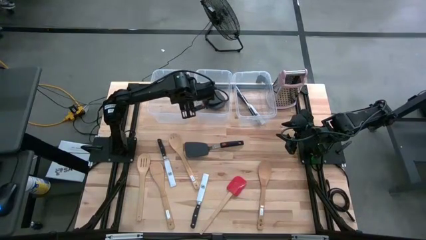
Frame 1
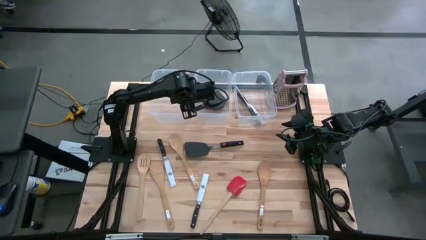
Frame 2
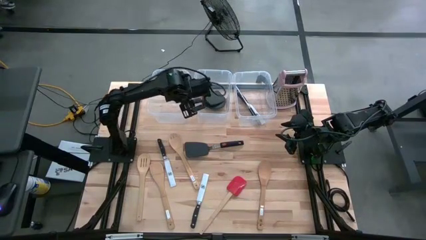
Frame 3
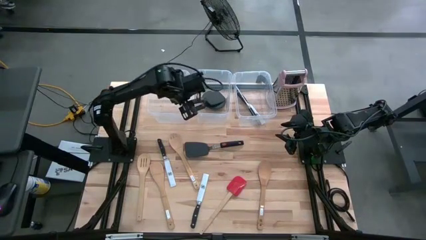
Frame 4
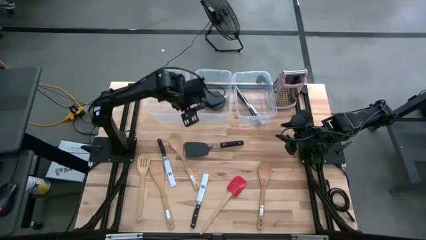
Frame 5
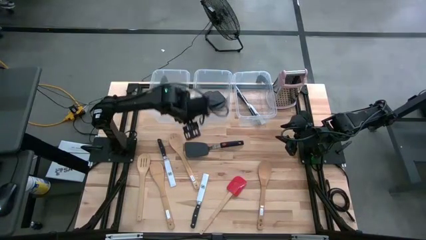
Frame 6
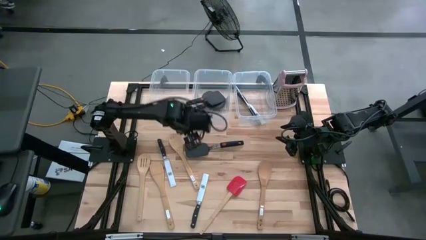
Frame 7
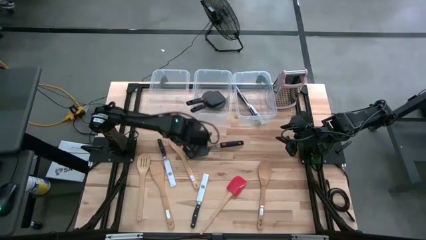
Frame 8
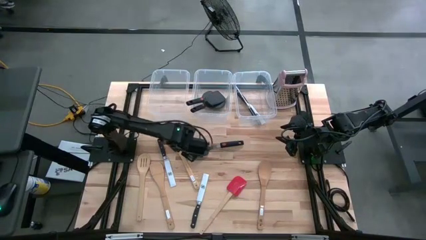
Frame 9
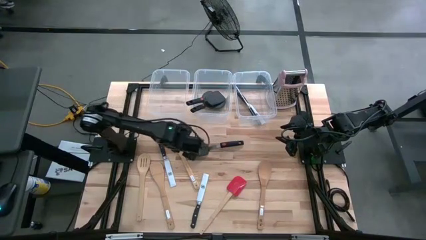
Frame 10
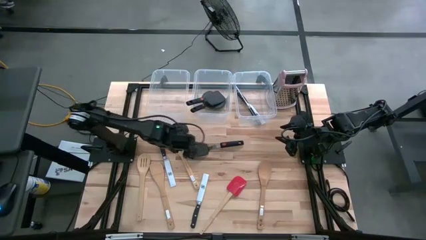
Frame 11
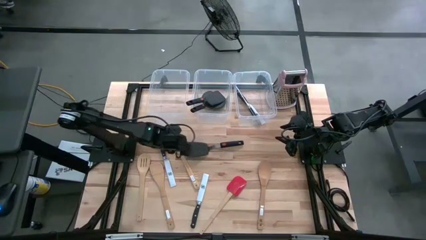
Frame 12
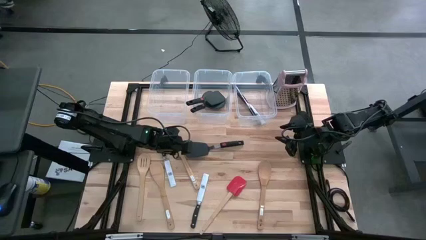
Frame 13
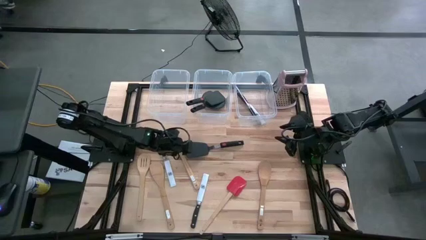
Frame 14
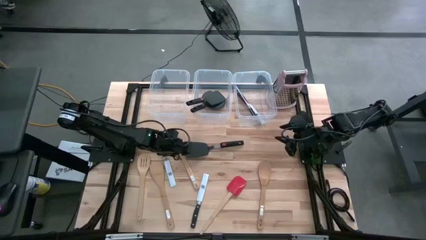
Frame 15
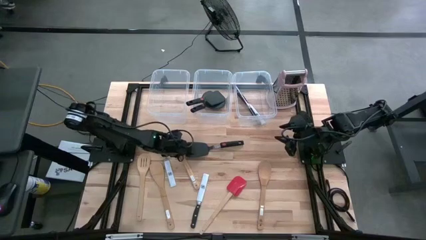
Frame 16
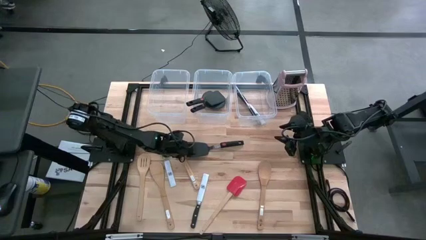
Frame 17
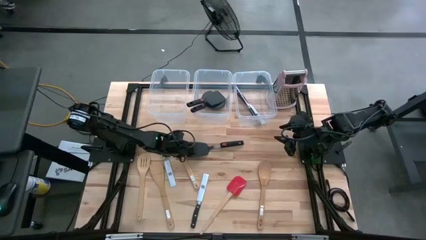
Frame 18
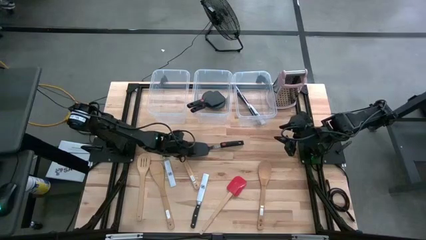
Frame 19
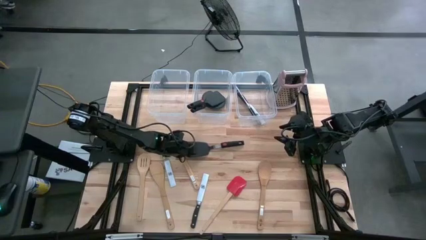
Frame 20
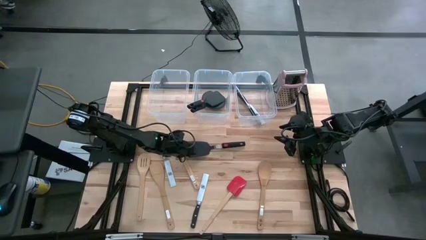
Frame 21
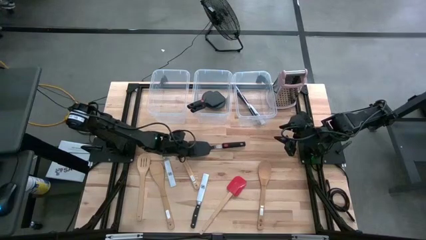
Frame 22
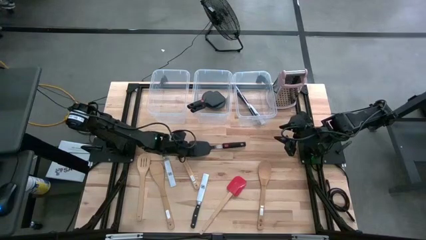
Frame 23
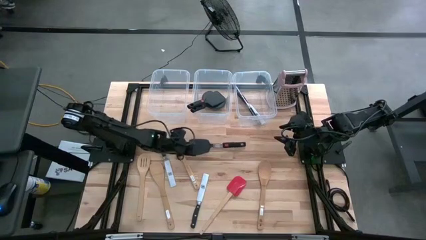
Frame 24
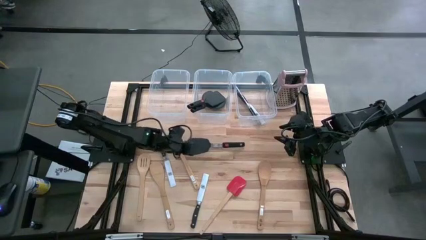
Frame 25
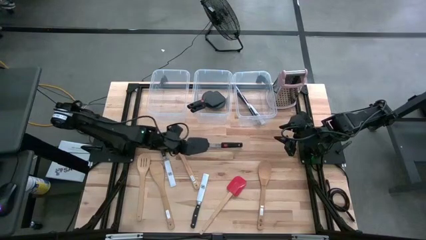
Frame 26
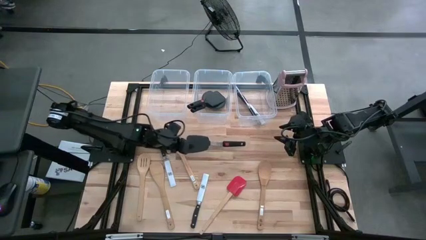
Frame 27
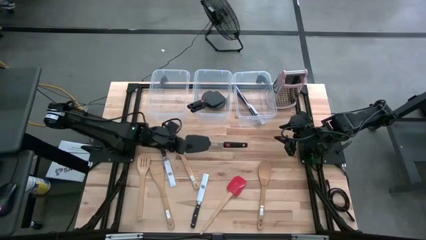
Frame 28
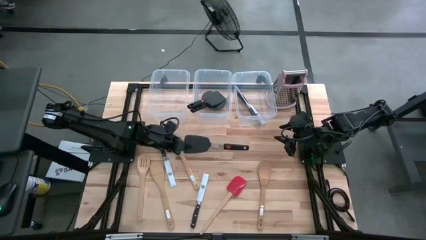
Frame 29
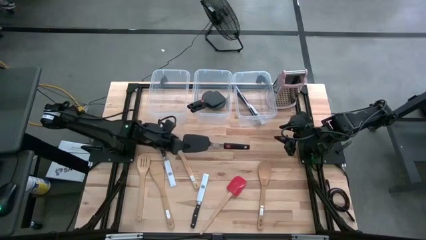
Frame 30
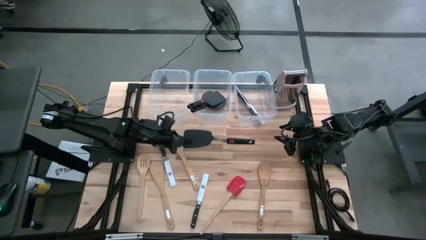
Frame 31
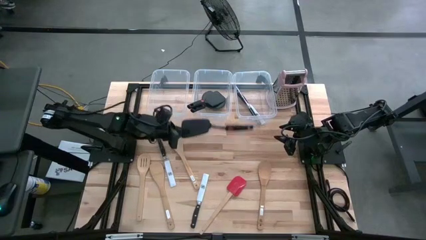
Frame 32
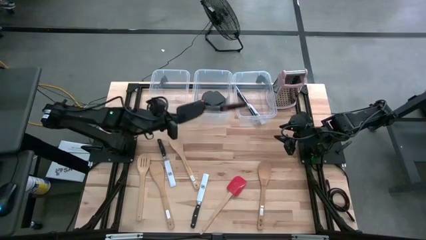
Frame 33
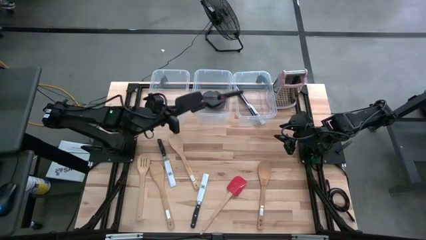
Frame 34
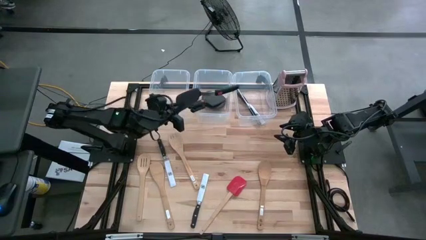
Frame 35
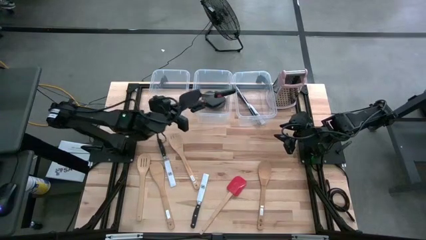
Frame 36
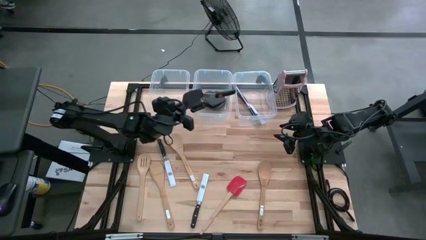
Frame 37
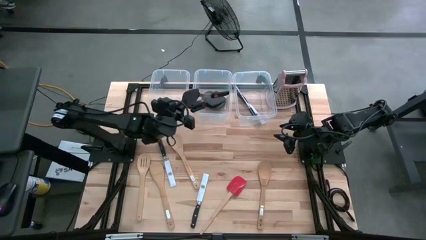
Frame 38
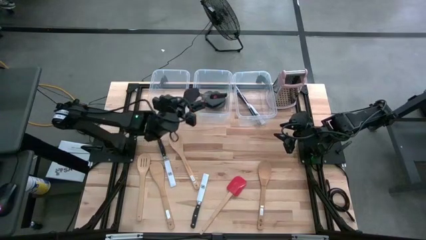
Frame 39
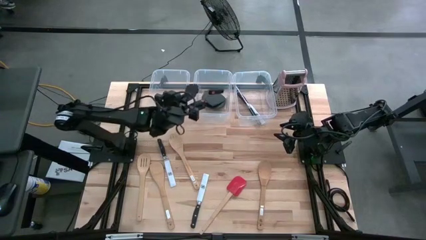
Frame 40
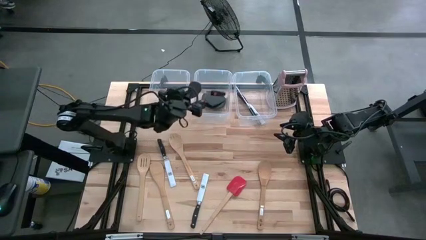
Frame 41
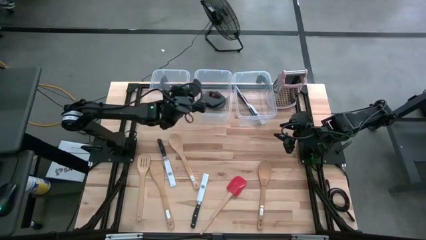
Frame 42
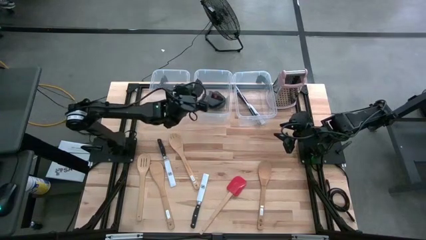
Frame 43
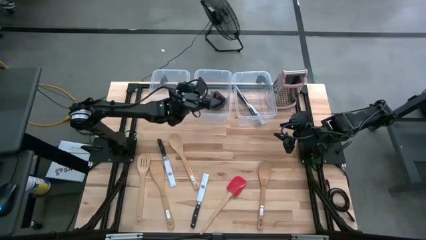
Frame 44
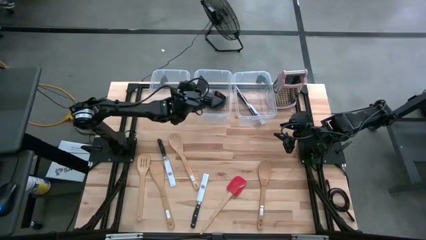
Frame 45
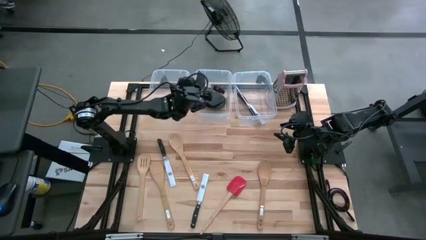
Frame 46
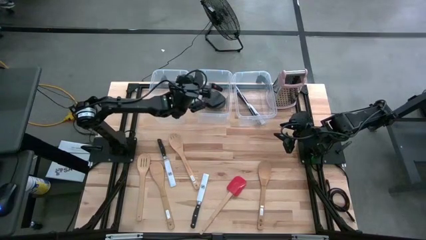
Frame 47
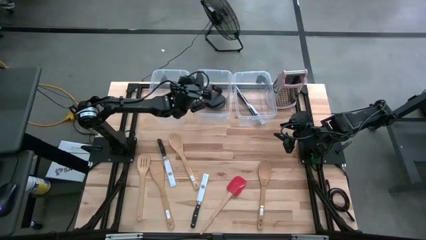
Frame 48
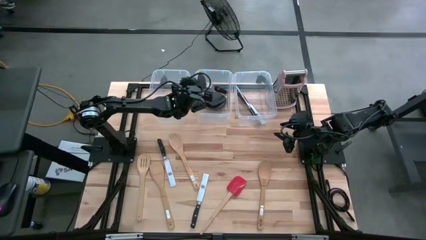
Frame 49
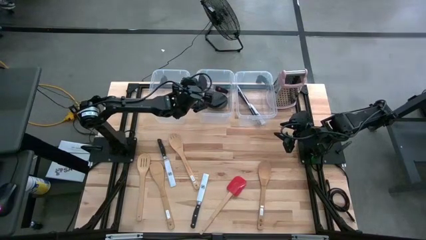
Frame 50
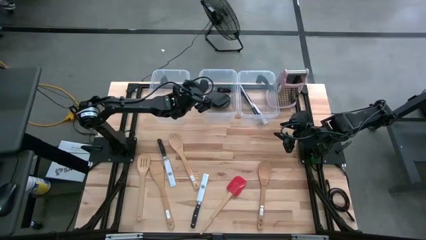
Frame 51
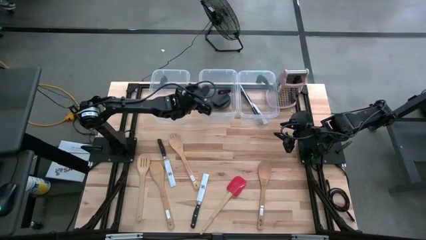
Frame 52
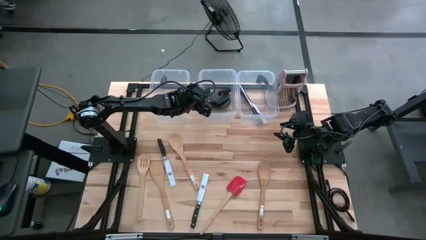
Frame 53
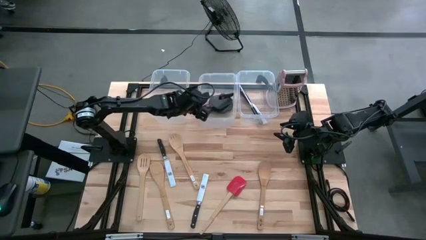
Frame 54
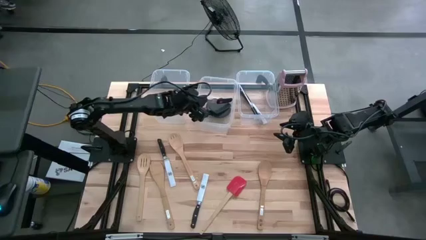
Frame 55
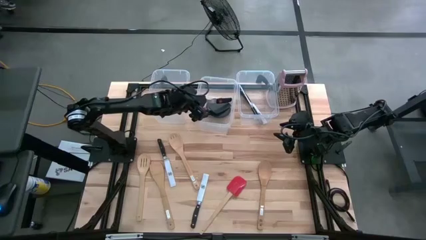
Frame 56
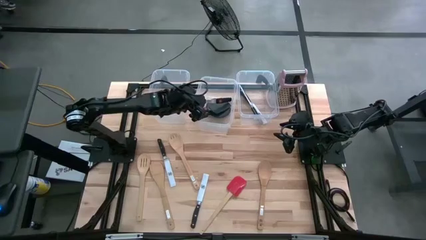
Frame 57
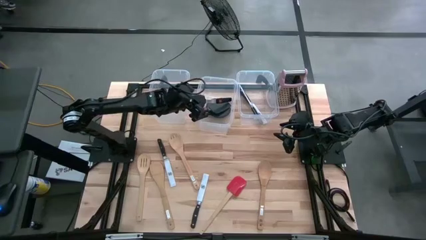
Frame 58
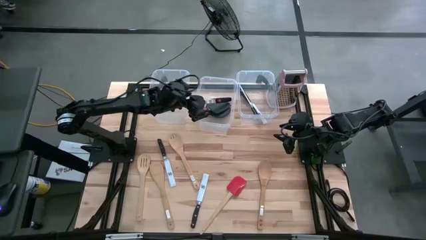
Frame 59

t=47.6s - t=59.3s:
Task: Pick & Place Kitchen Items
Put the black spatula into the transparent middle bin
